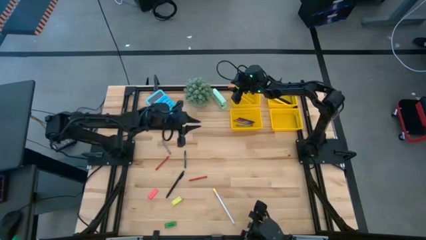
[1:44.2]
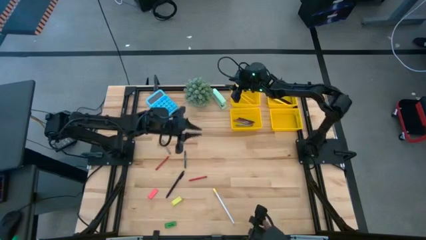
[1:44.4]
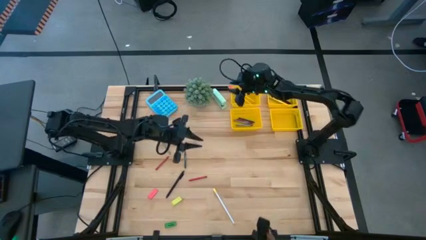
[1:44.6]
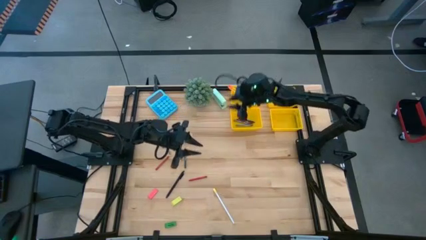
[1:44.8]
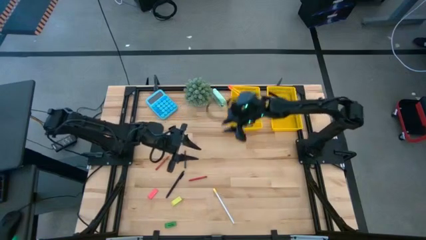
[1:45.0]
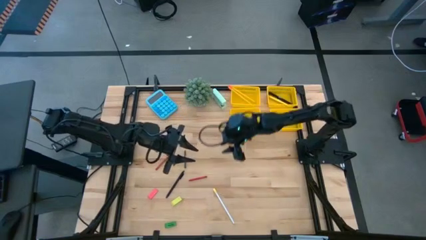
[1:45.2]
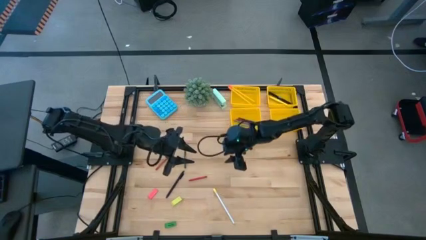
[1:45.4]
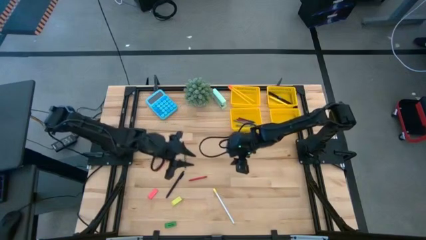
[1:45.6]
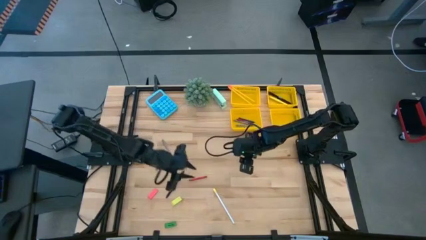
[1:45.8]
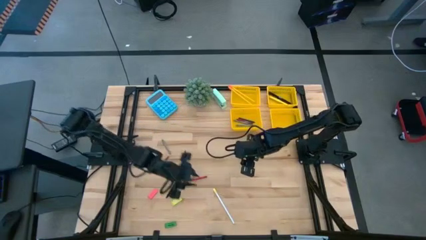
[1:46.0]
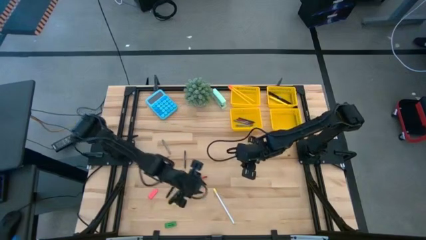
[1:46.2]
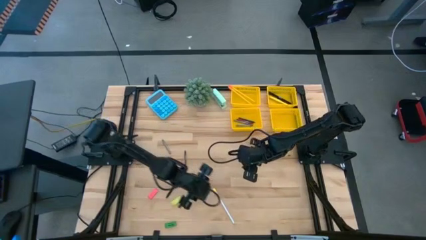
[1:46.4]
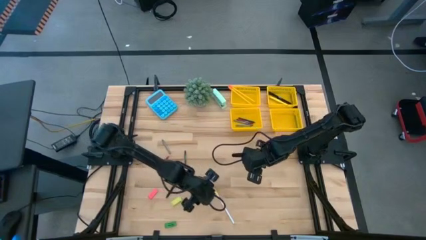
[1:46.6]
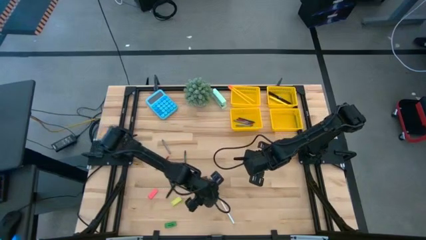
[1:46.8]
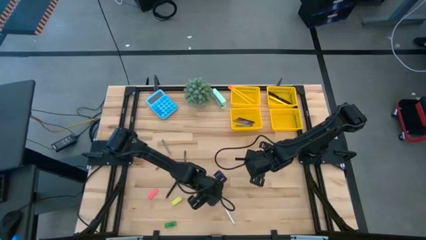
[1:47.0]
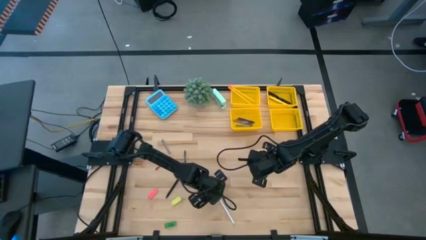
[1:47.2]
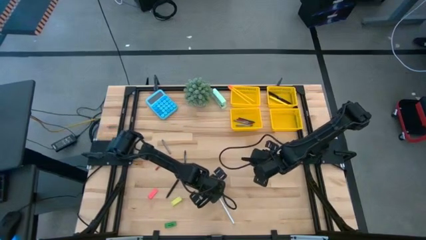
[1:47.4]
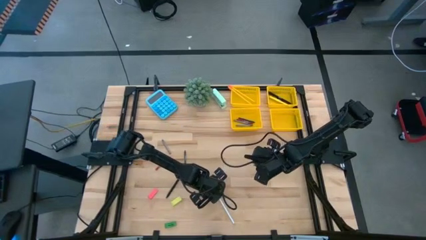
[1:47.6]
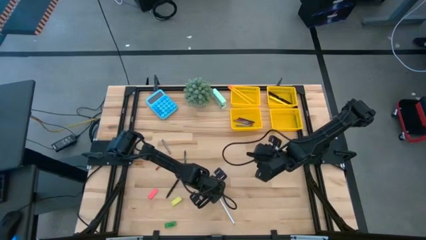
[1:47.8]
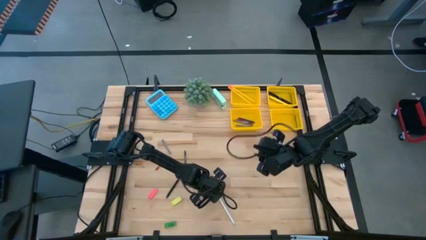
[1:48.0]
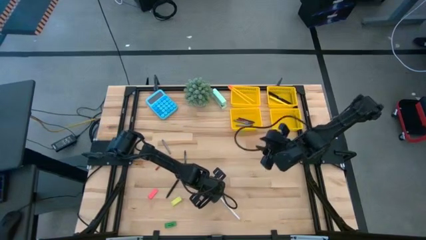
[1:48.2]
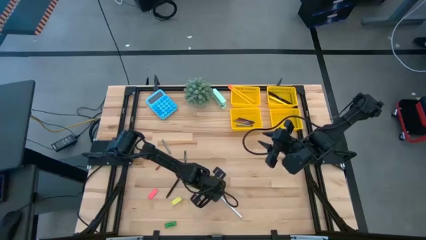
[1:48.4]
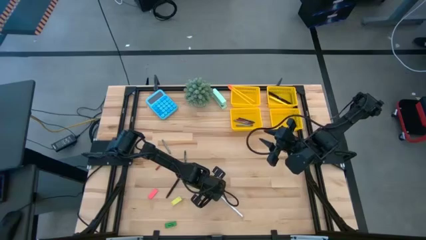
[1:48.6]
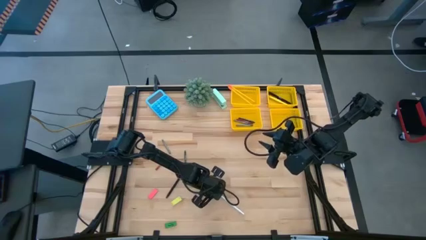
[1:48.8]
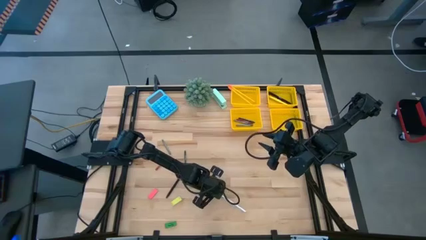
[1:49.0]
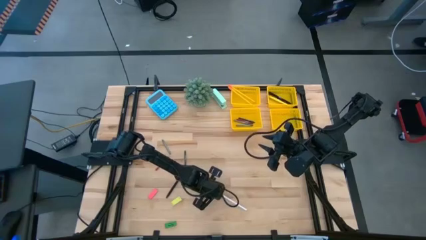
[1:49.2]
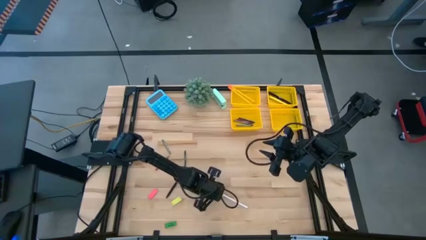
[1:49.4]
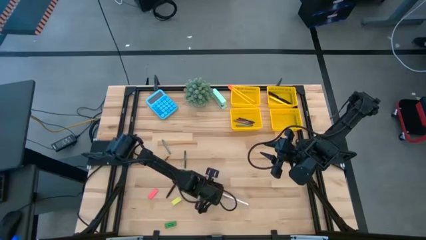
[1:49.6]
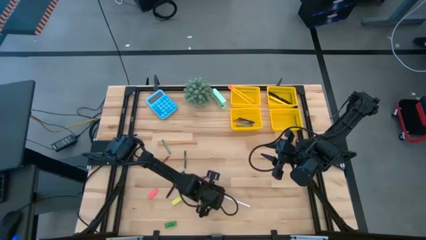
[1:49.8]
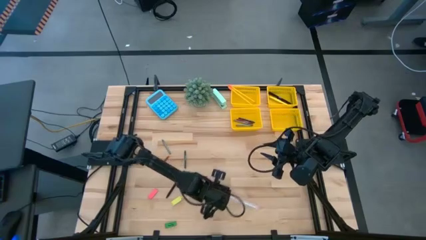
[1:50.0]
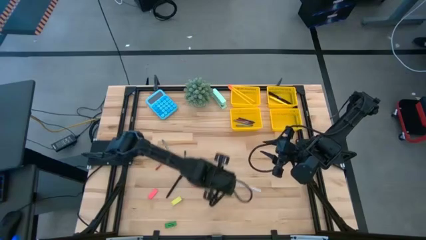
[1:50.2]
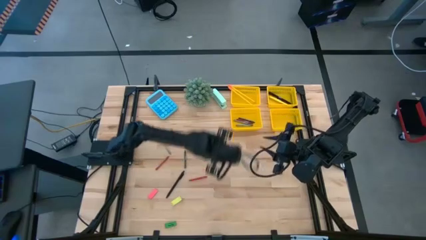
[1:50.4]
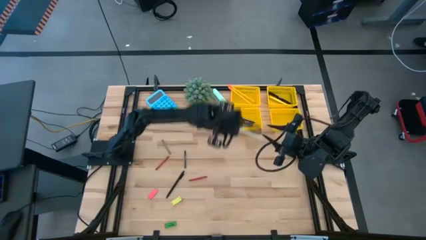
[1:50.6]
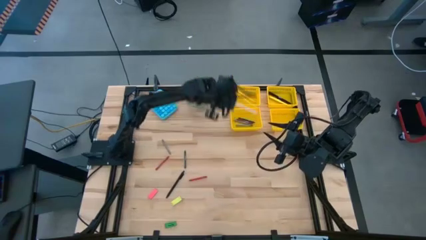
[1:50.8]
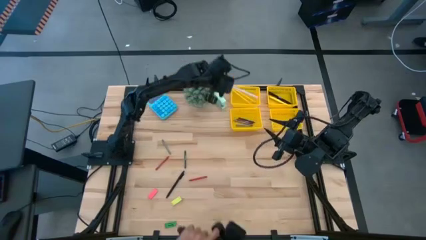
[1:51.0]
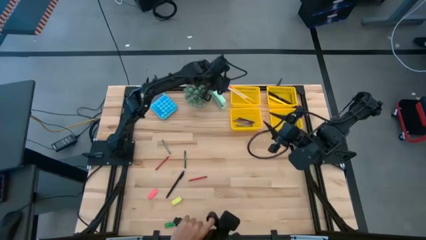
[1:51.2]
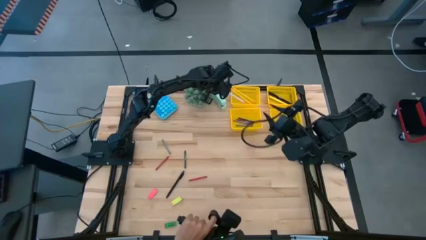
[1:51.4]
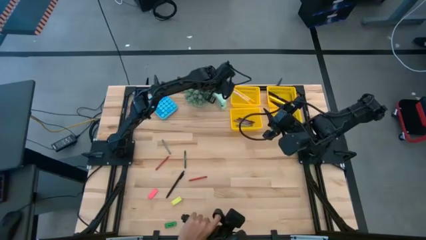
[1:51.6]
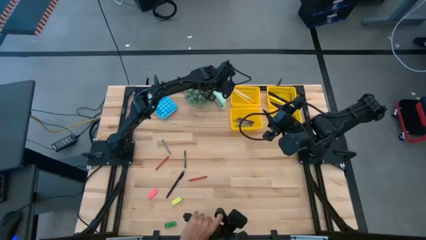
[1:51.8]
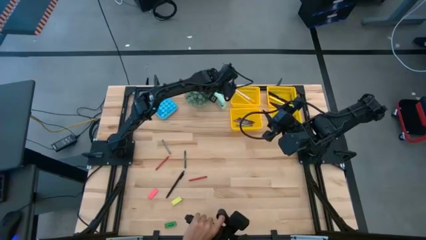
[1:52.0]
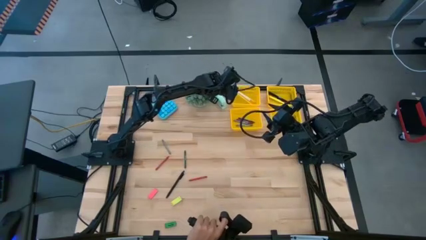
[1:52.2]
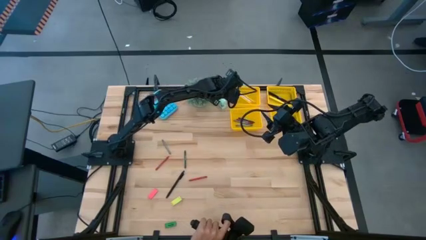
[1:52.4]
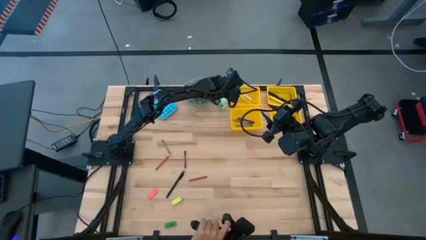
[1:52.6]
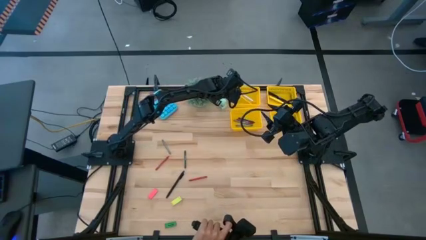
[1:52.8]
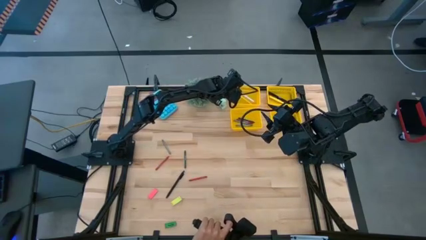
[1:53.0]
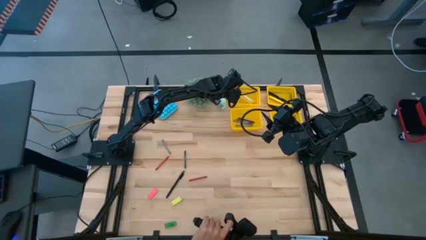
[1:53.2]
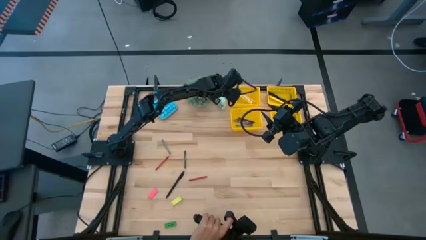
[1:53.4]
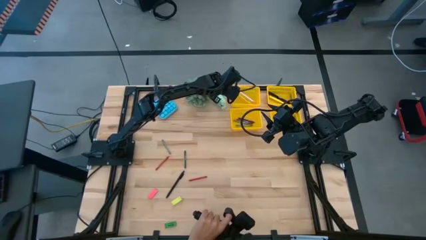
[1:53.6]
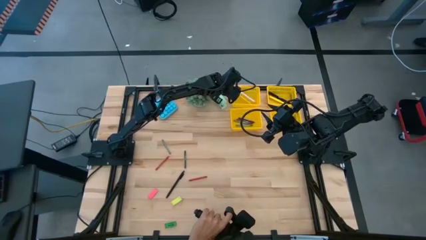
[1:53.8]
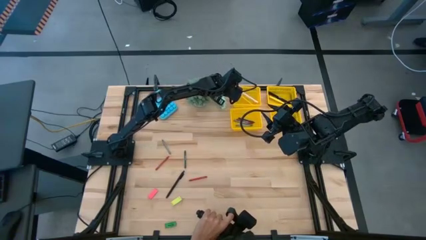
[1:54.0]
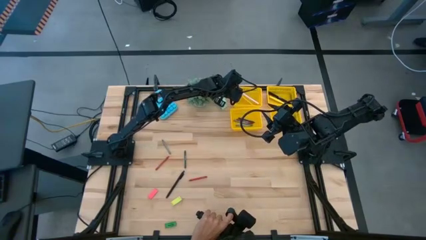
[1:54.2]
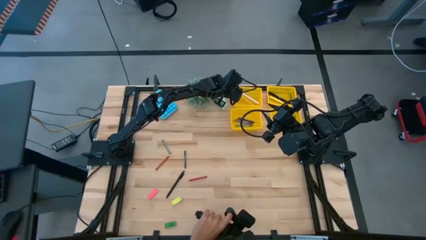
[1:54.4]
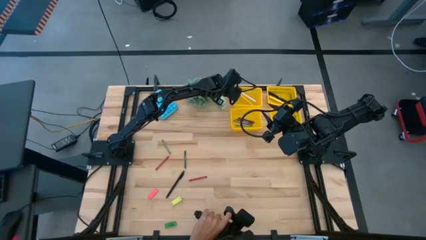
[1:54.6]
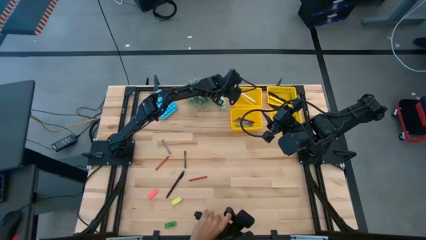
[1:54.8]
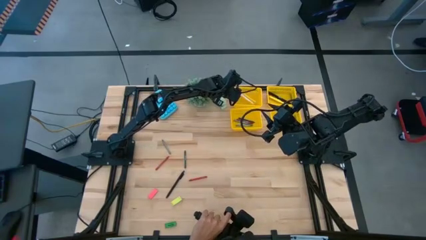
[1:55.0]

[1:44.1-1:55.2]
Task: Sort crayons/erasers/pens/pencils in bins
Put the white pencil into the top left yellow bin
